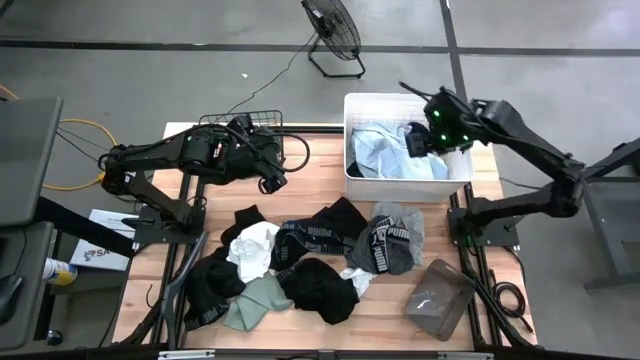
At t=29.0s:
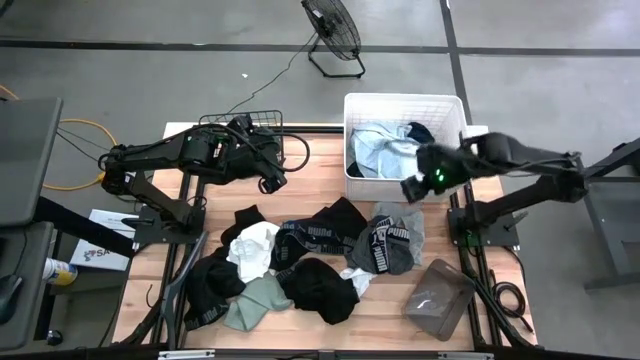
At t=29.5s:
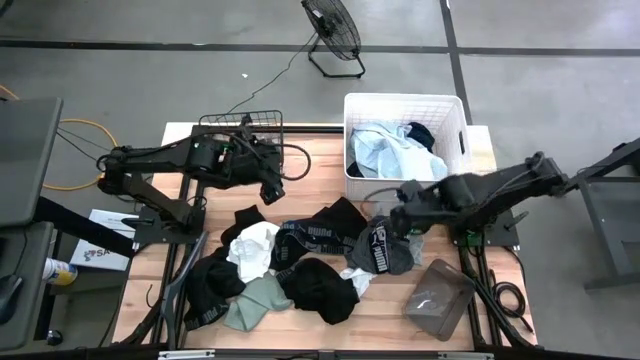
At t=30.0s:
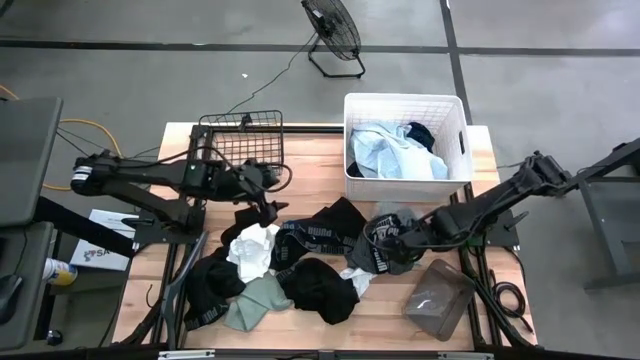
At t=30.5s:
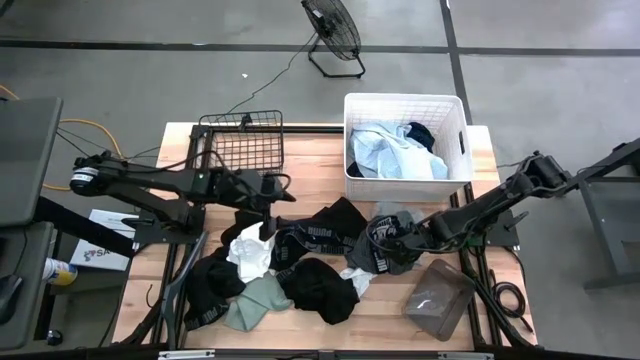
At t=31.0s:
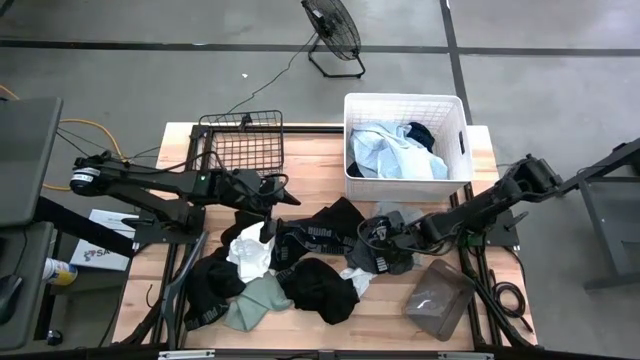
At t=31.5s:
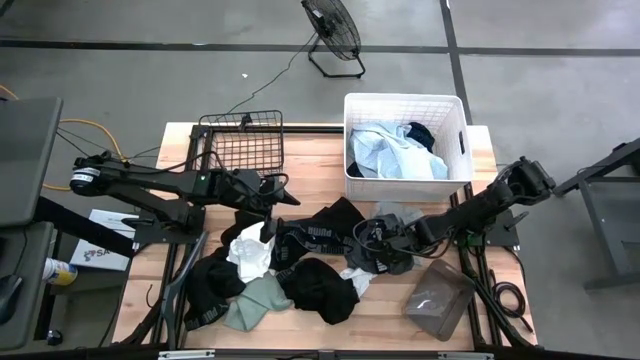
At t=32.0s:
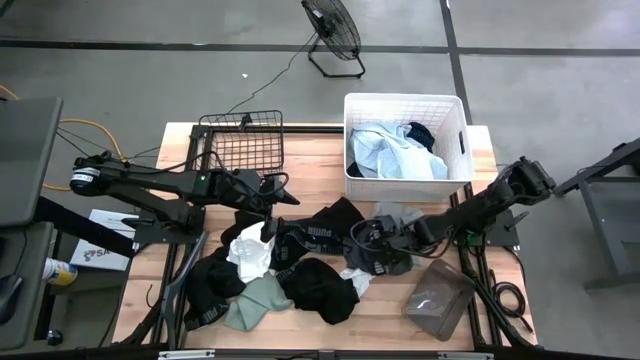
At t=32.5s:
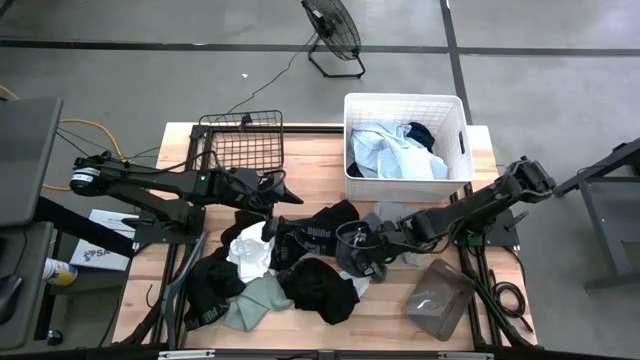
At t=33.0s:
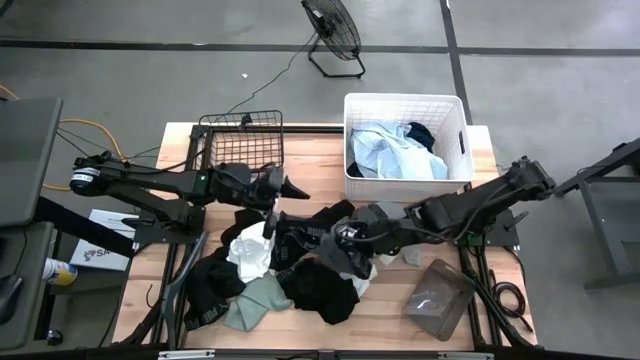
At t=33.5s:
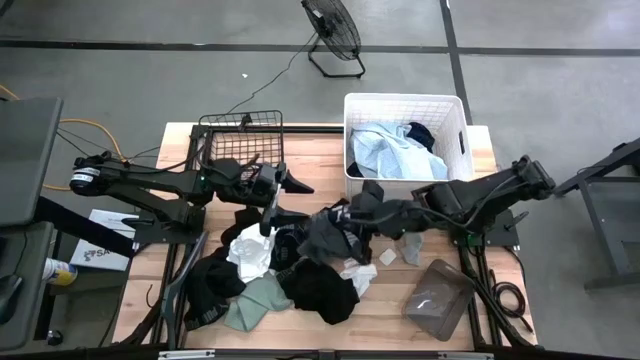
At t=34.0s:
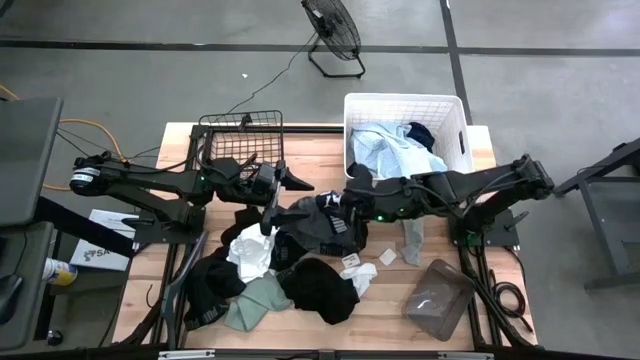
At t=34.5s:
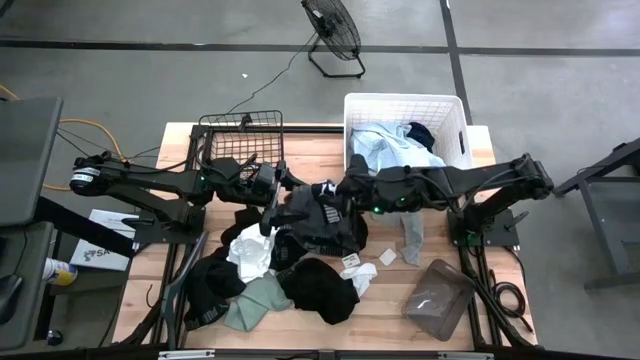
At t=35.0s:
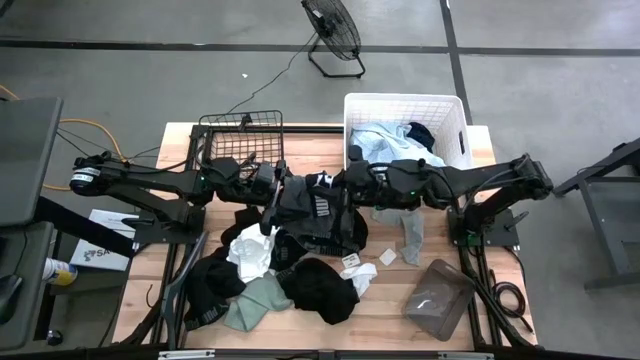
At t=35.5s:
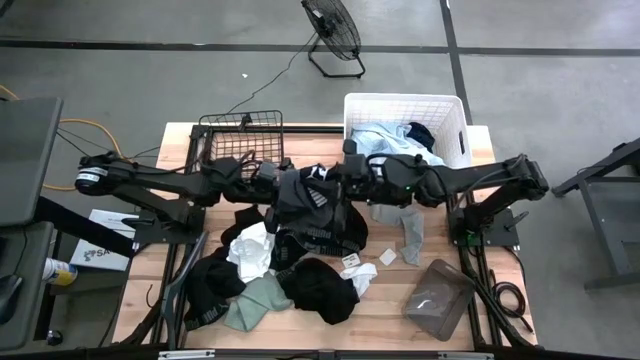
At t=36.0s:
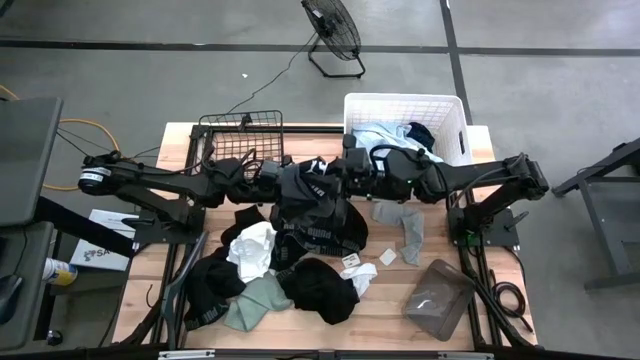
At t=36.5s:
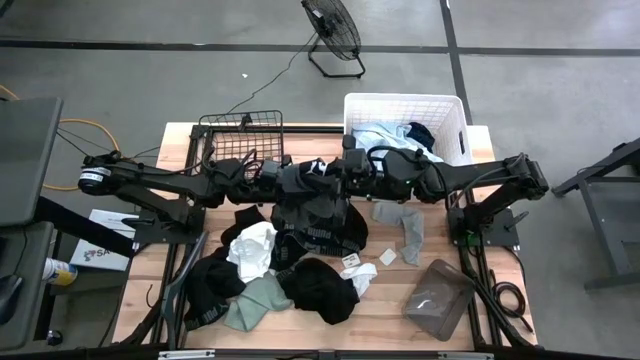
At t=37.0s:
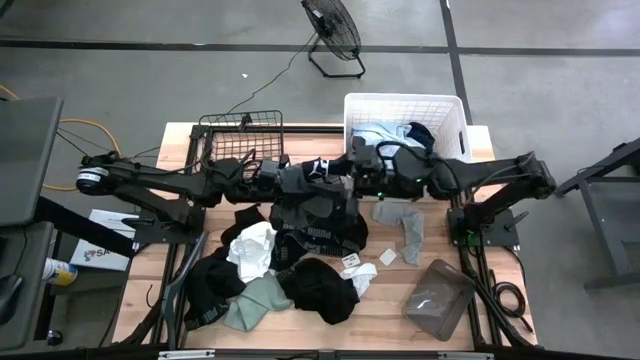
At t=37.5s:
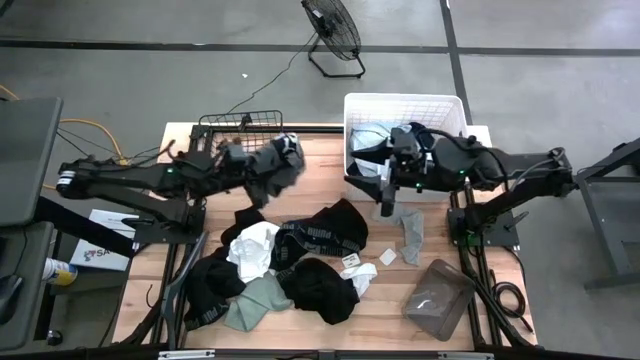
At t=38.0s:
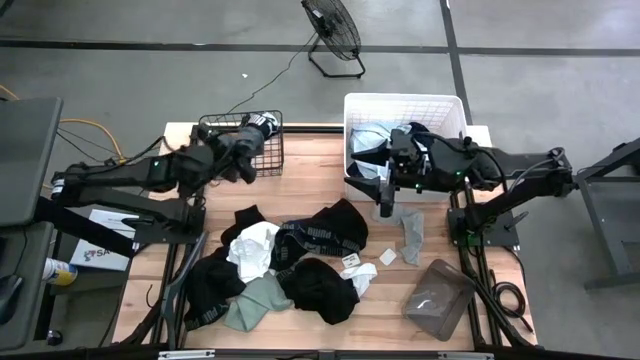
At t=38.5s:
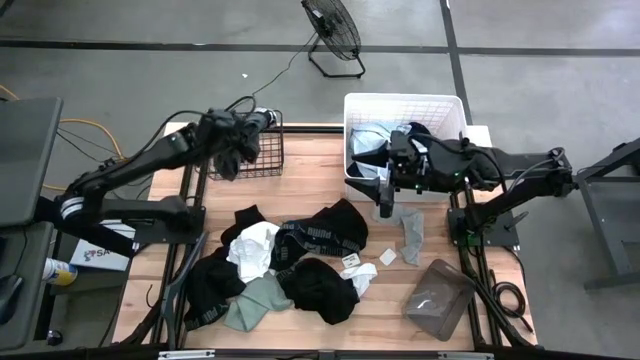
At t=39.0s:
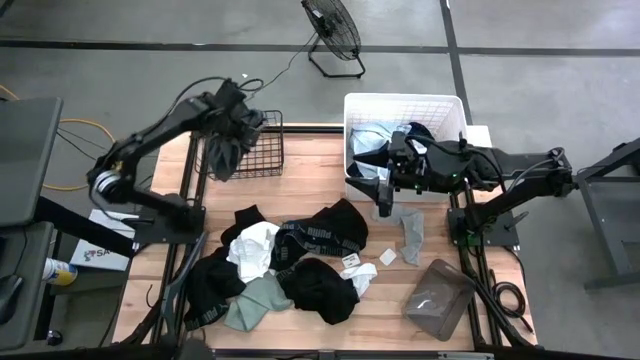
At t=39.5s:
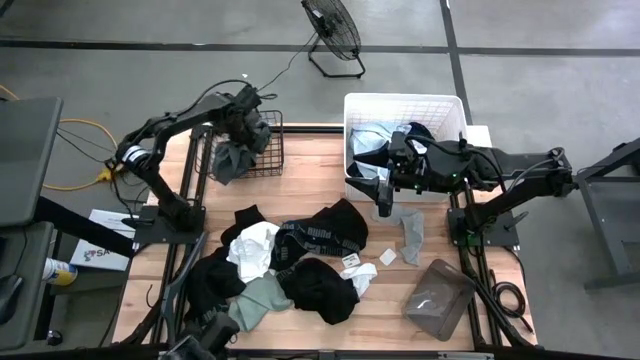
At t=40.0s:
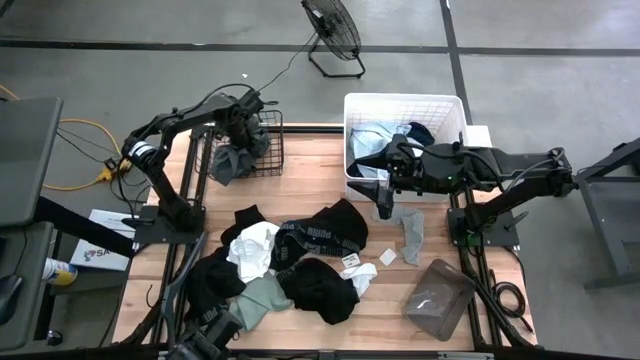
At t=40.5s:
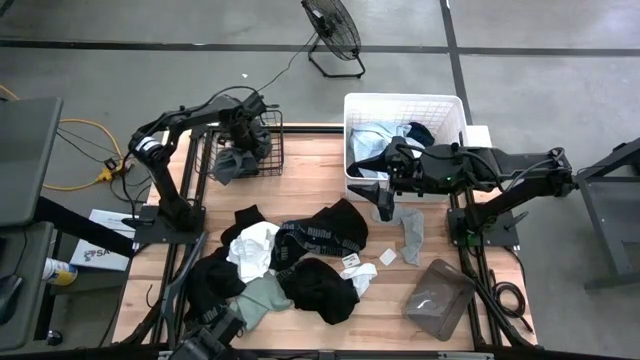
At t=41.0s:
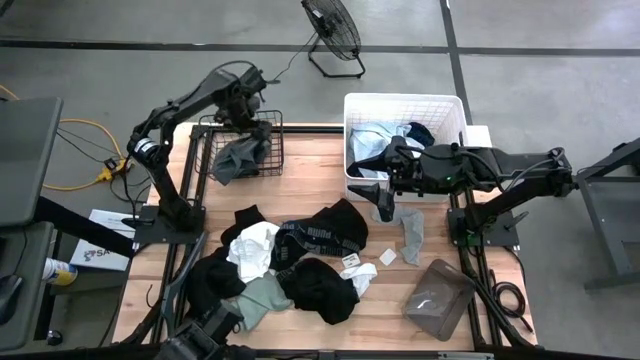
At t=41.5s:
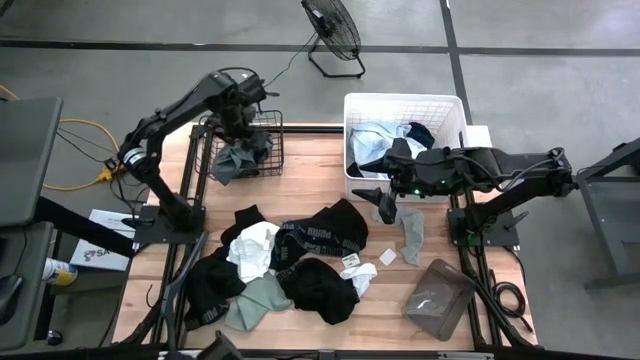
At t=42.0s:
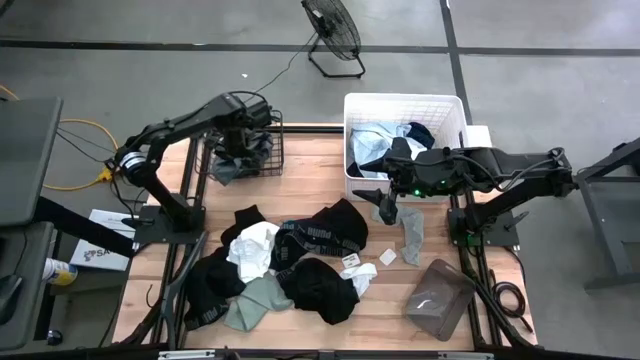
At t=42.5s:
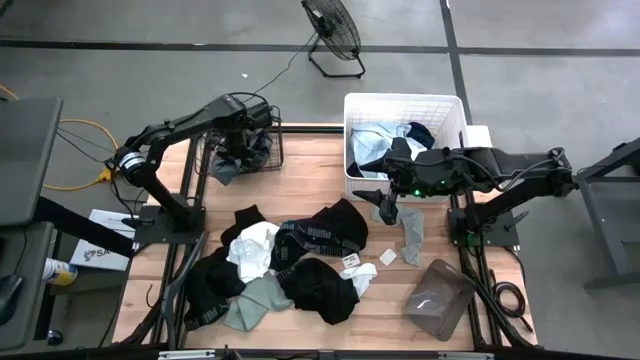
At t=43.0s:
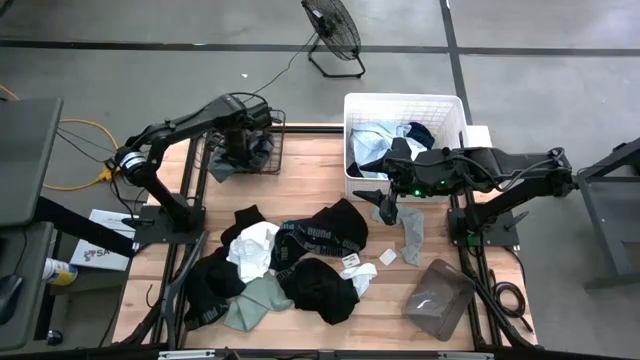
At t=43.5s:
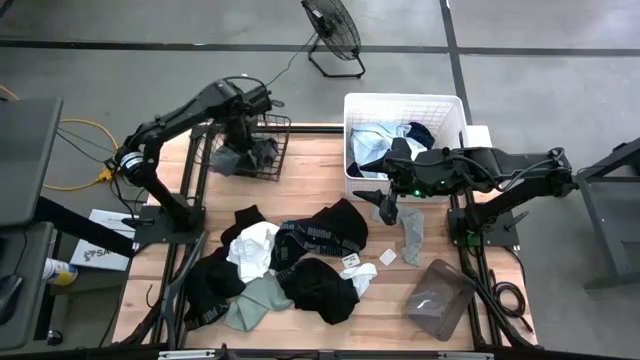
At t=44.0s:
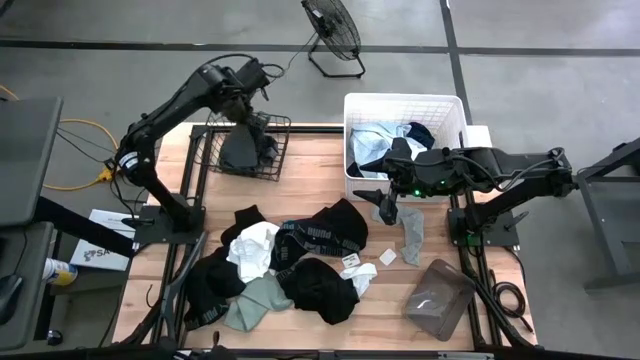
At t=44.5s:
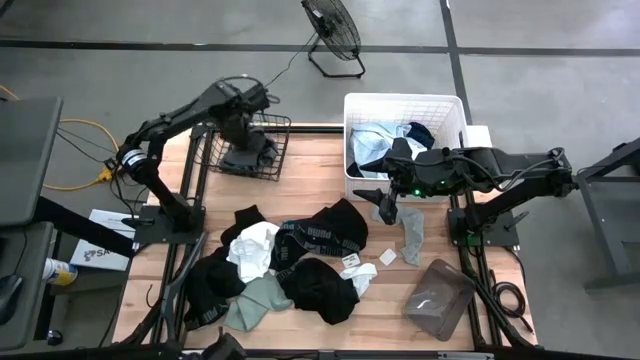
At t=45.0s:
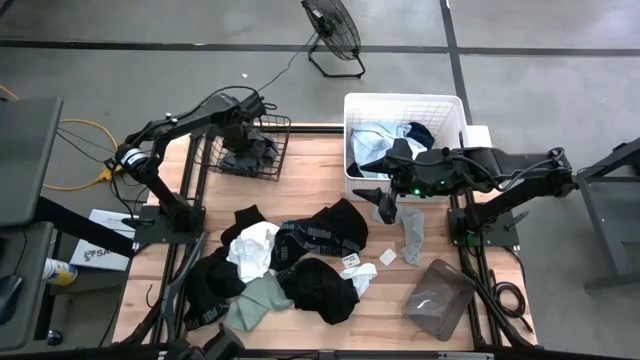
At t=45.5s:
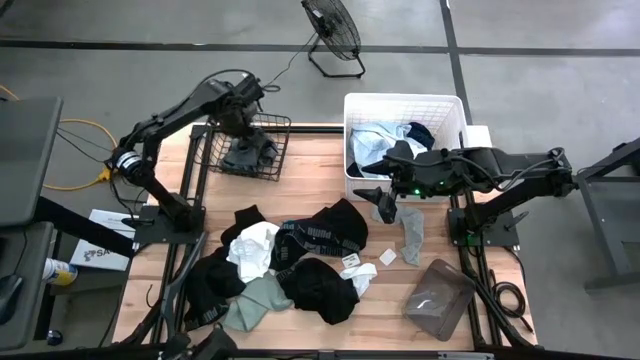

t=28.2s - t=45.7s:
Task: Pick & Place Cloths
Put the gray boxer shorts into the black wire basket

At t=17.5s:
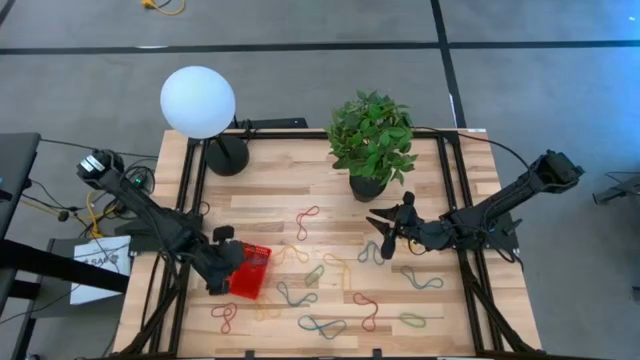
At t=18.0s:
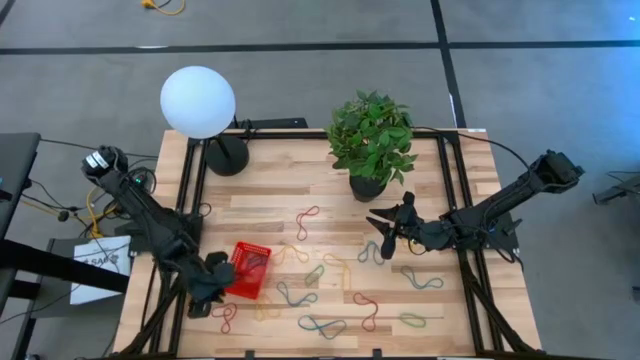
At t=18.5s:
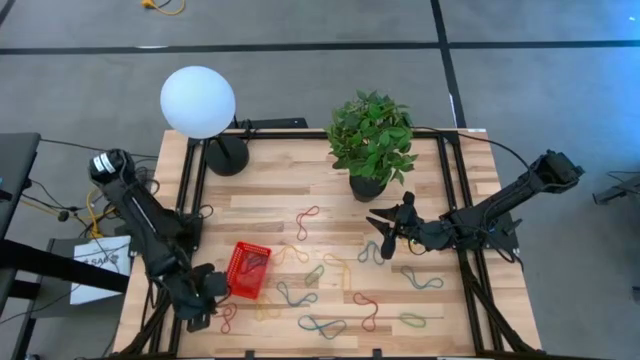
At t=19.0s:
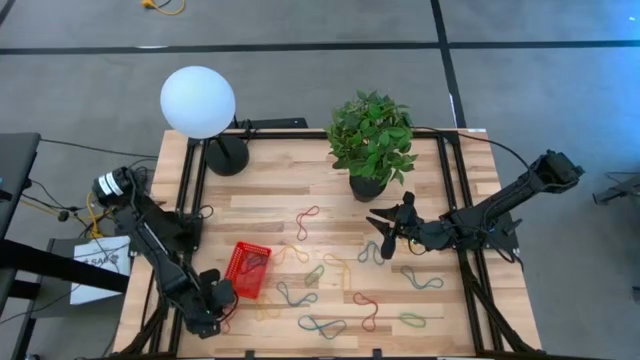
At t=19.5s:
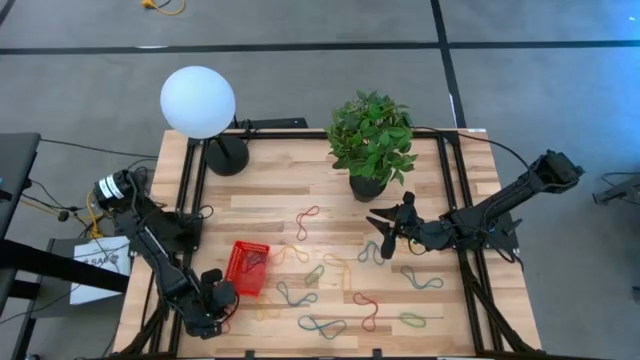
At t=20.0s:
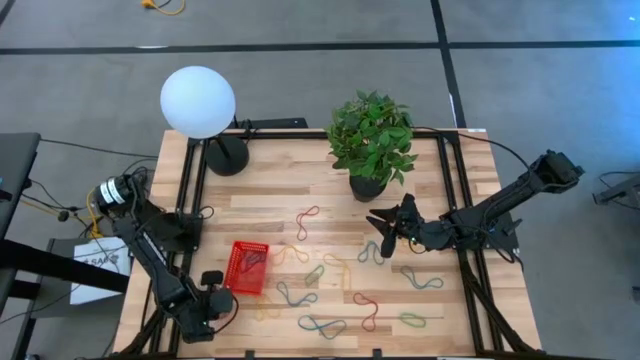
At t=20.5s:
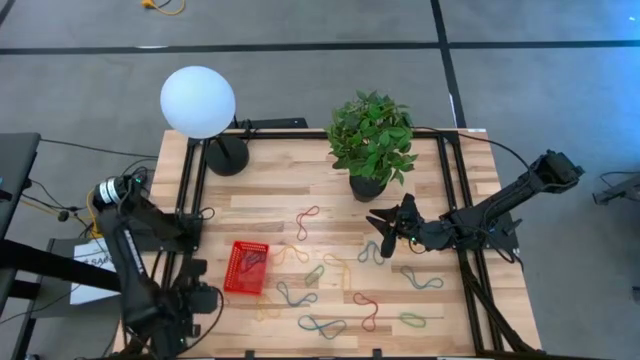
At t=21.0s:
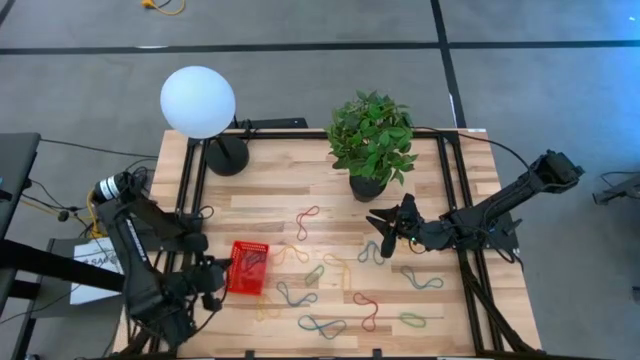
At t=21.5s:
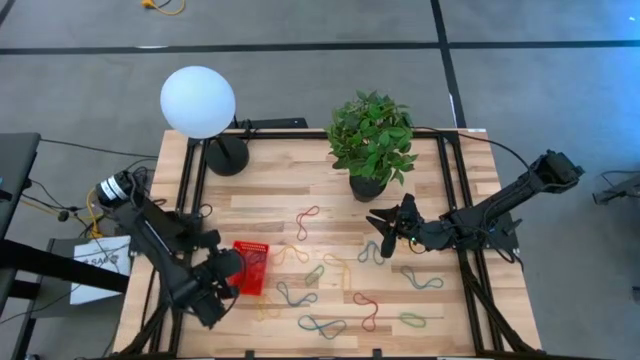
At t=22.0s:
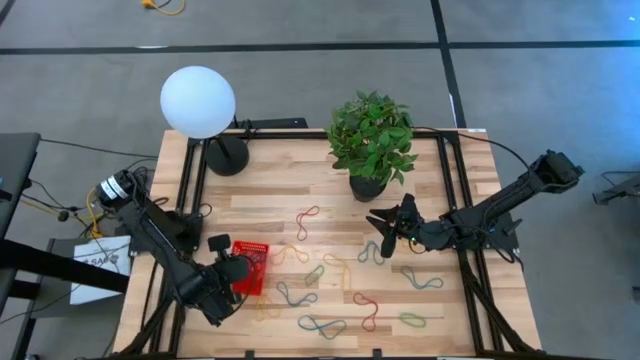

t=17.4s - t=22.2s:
Task: Pick and place items into bin
Put the red rubber band into the red bin
